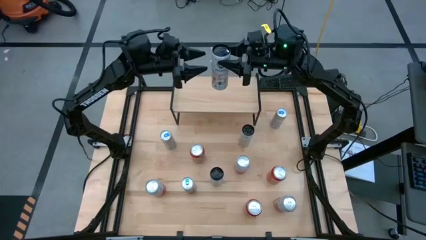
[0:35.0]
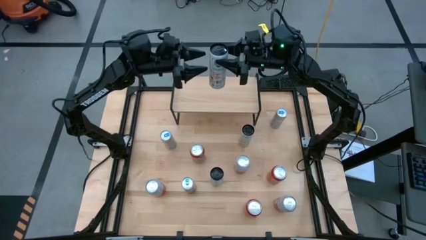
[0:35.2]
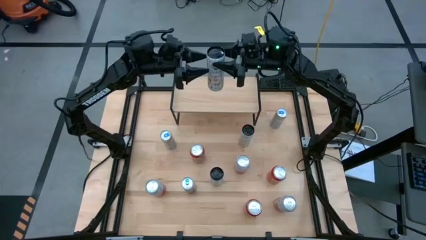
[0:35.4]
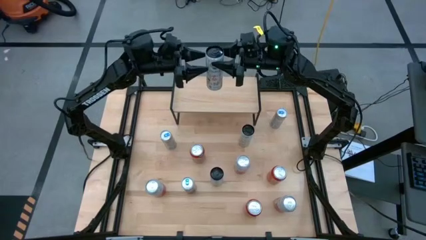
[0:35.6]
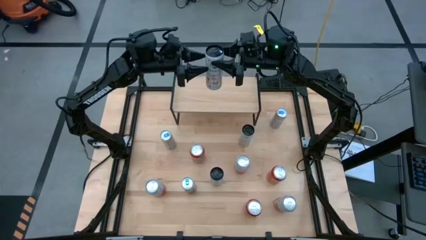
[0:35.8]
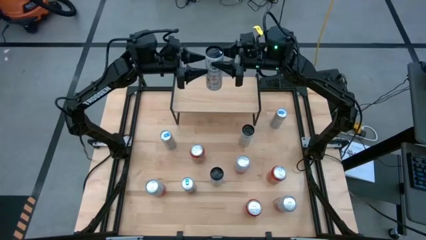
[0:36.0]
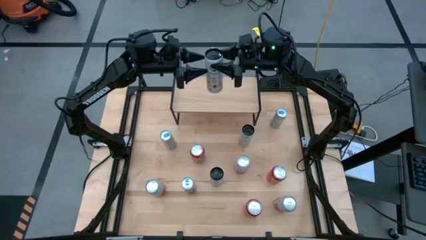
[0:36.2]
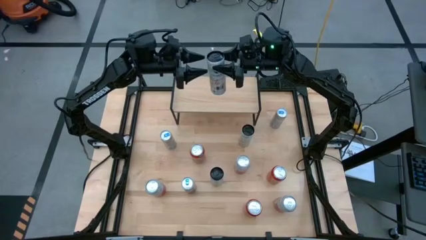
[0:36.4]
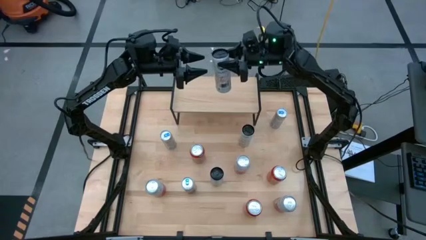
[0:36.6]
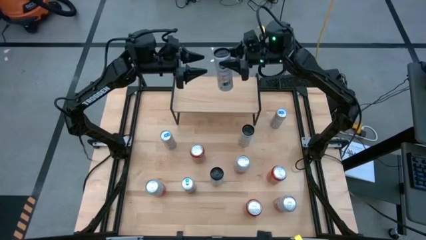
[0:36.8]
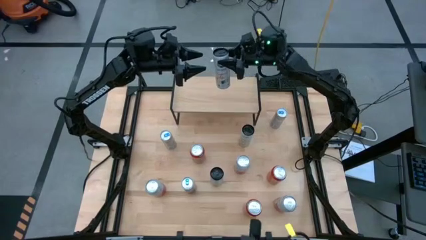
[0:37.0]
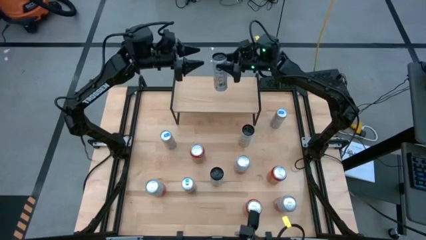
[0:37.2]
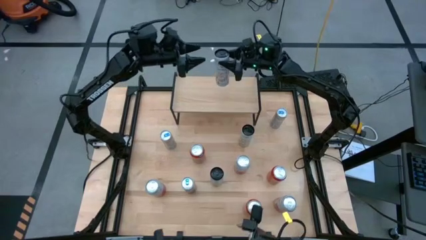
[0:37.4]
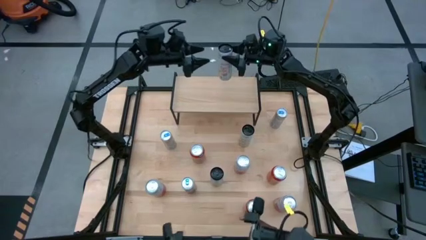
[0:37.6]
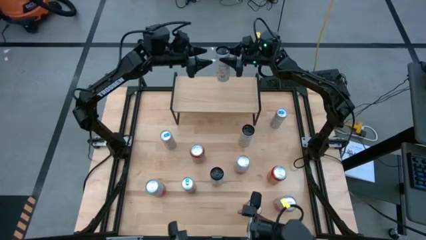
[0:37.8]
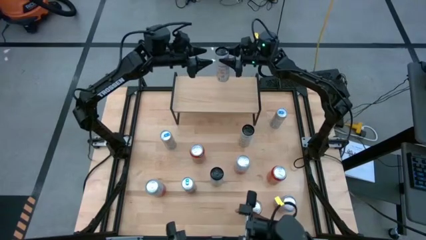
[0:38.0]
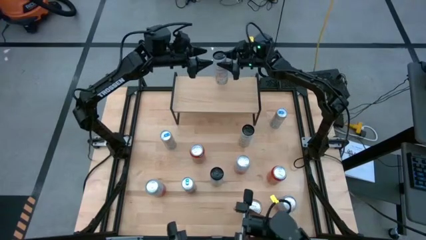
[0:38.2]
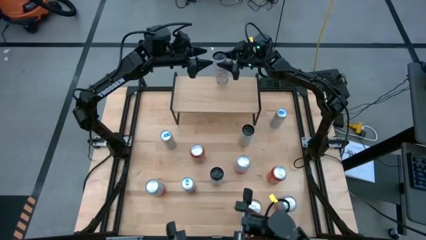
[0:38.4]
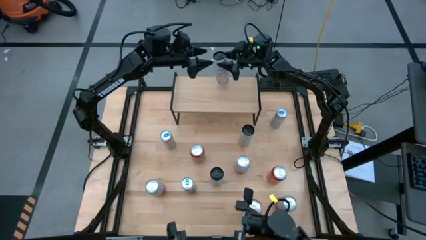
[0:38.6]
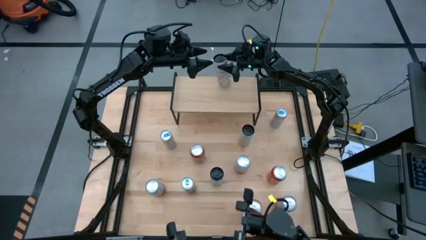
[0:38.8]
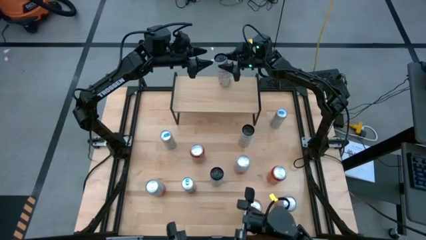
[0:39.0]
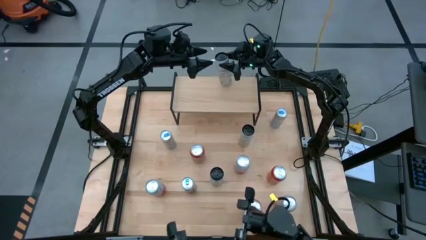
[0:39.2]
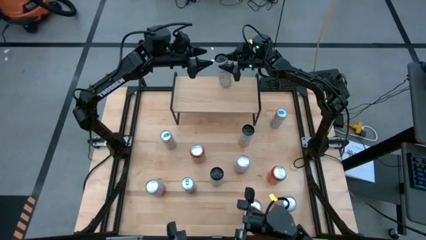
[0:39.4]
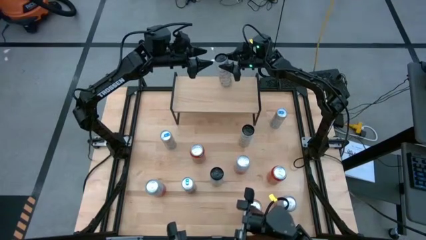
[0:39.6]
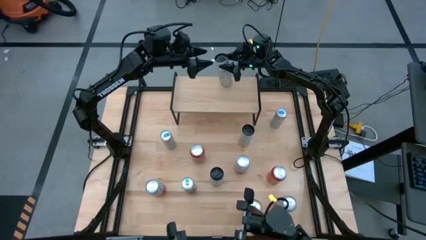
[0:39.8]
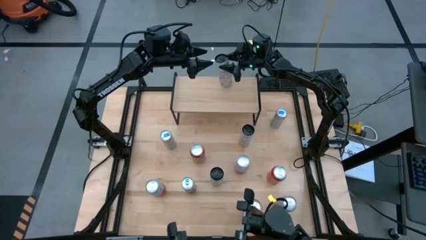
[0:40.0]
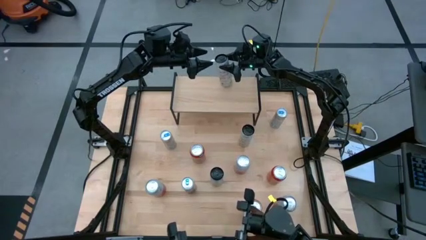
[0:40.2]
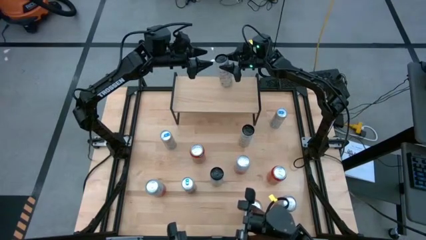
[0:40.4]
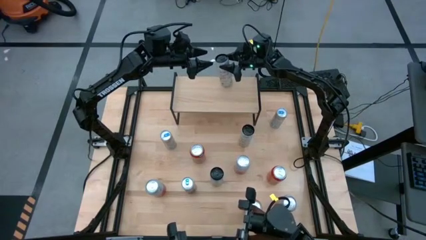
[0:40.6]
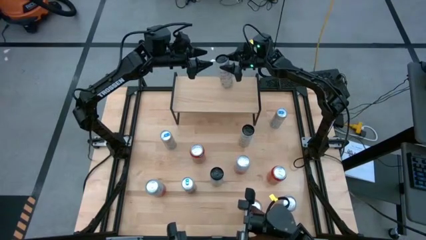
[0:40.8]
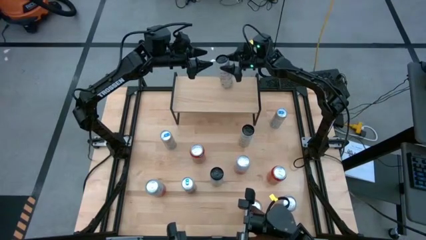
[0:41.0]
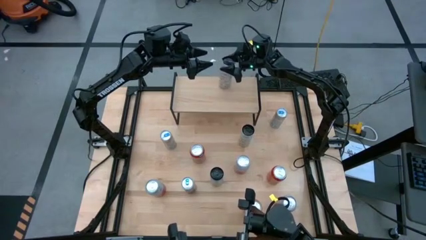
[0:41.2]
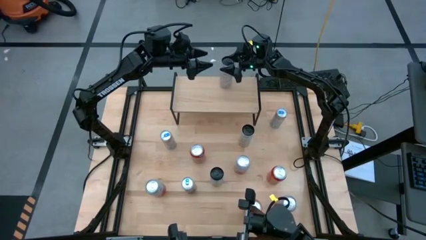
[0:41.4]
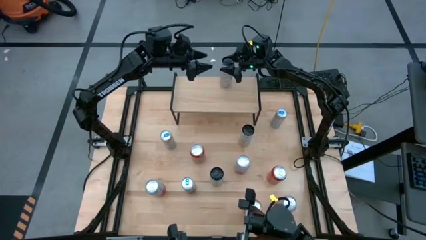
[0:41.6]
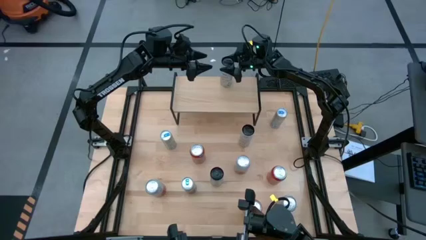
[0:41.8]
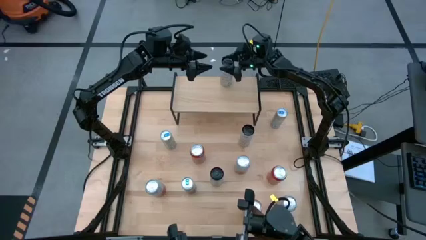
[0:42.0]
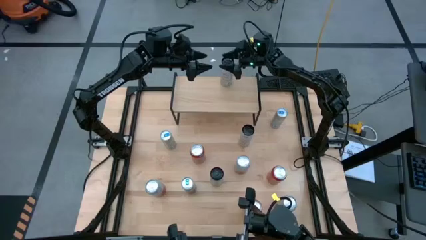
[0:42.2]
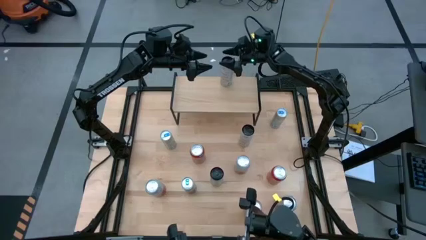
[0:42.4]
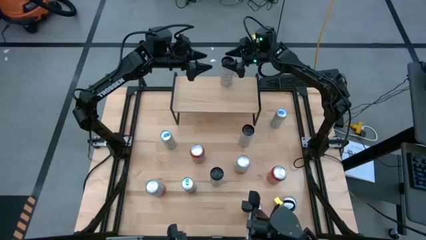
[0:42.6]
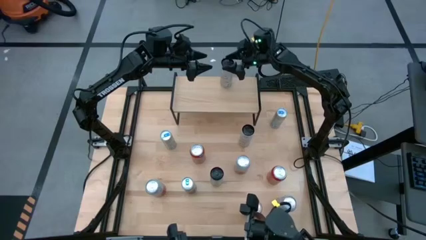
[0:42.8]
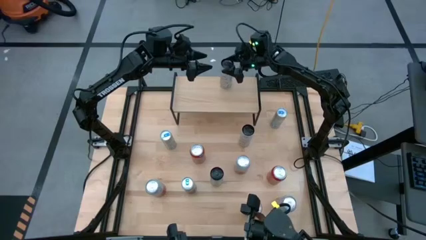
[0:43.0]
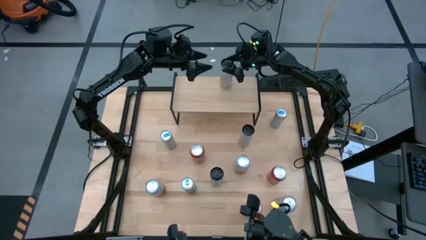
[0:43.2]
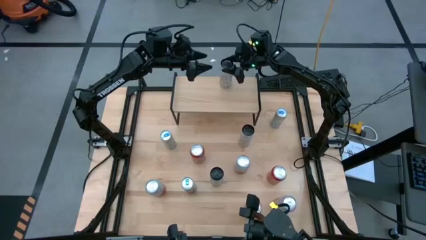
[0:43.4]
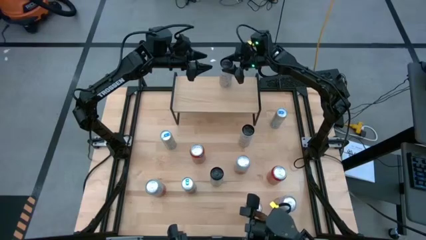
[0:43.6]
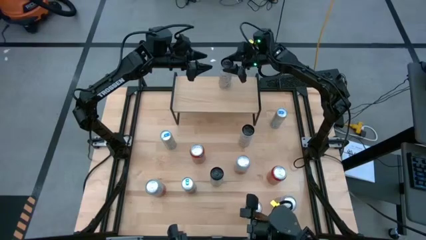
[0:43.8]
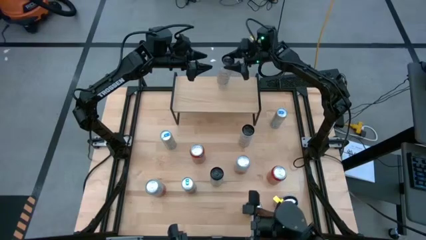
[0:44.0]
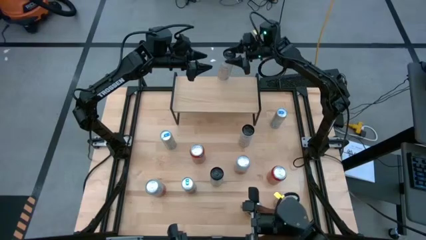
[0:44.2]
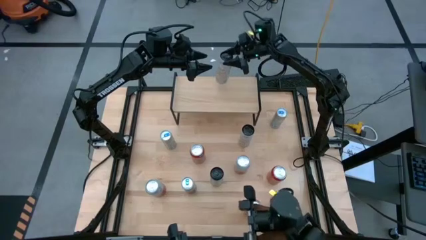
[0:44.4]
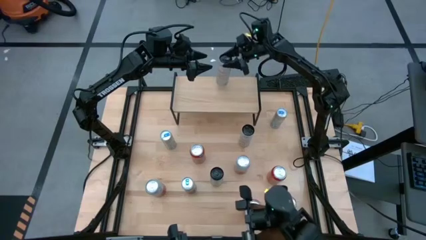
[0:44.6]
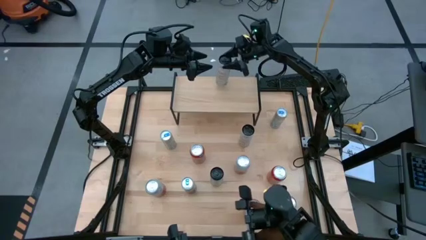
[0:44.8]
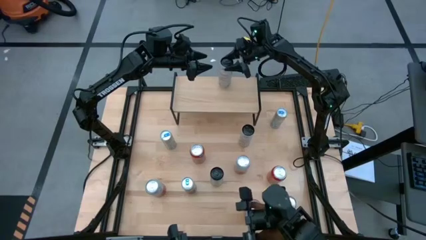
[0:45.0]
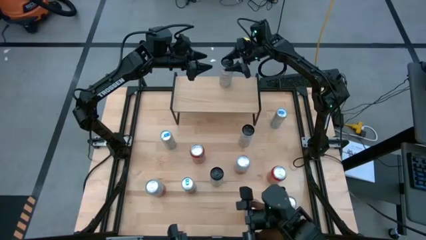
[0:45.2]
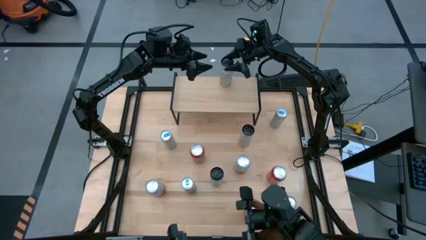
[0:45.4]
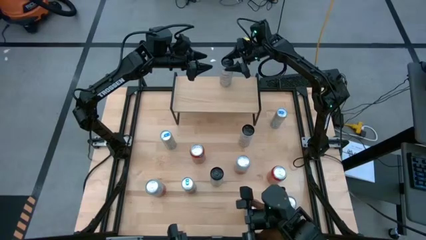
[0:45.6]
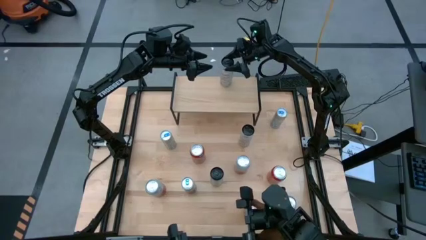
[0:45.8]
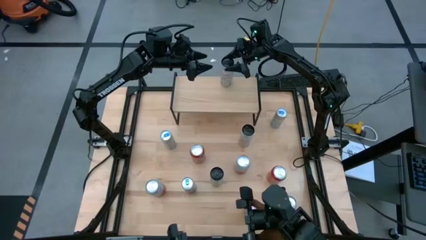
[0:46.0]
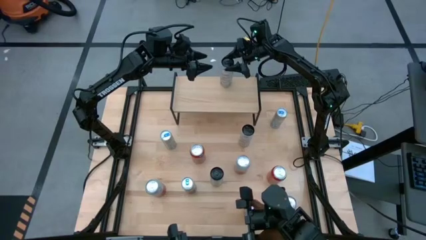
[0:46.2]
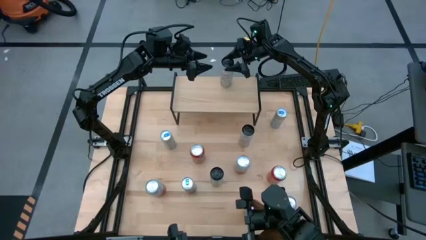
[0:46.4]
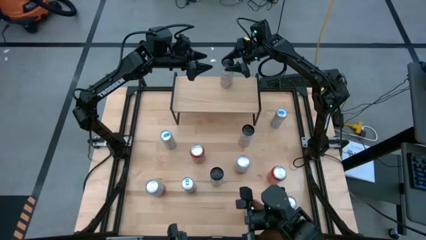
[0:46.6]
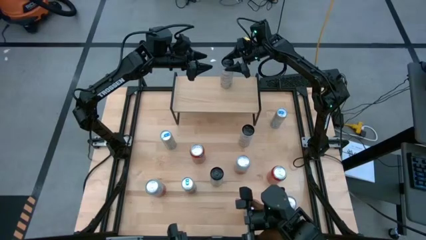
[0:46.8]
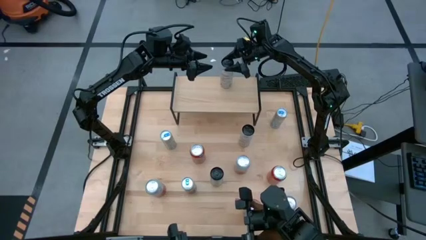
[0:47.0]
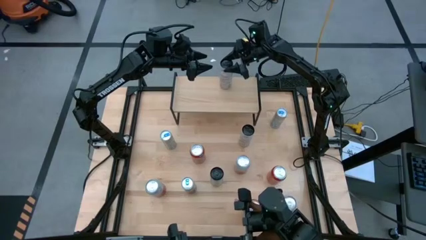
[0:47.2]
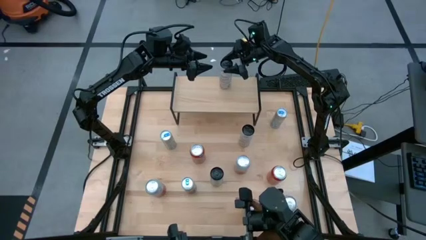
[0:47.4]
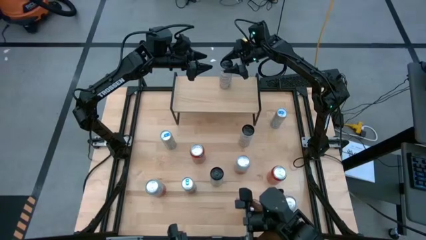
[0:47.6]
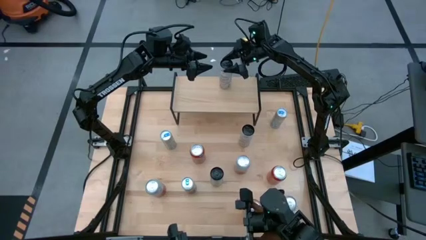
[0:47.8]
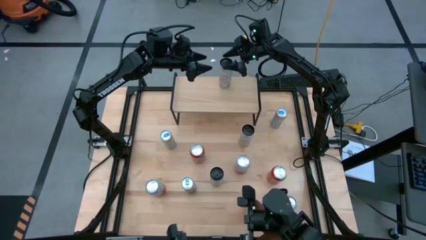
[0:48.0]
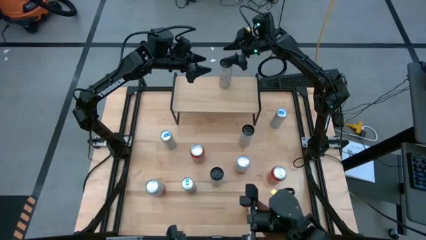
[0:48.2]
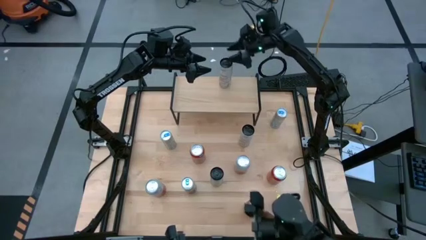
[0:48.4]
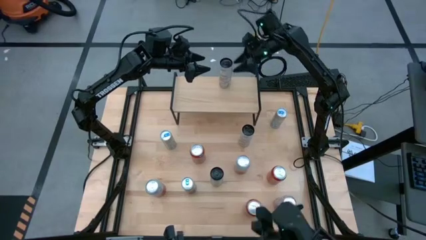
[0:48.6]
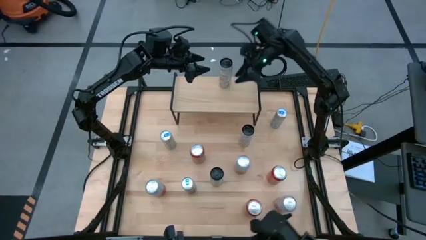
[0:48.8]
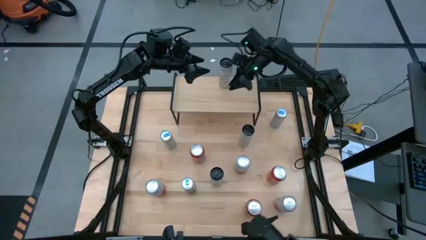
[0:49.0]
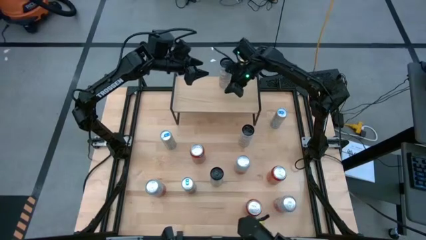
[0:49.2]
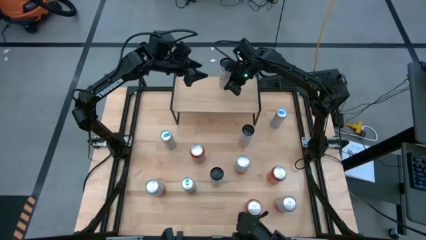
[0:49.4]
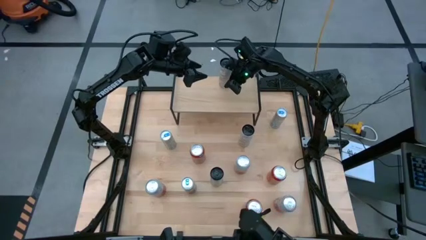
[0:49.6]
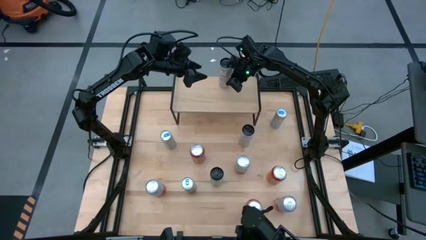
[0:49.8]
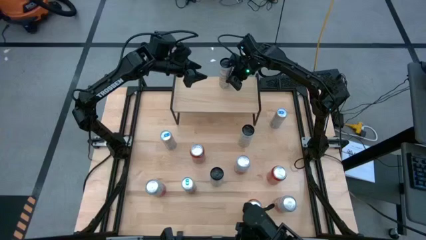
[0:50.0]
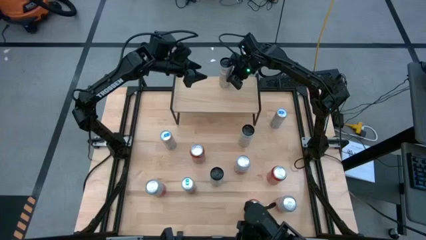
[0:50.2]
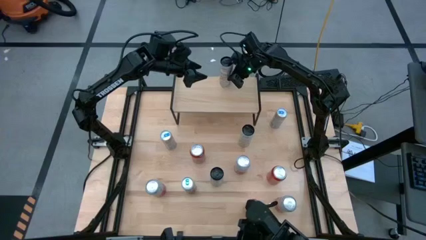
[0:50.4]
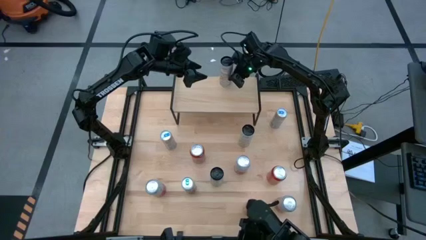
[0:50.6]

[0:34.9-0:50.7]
Task: Place canned beverage on shelf
Put the top left white-yellow soda can on the shelf
